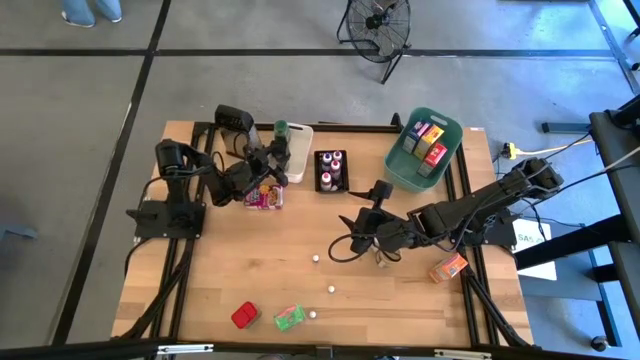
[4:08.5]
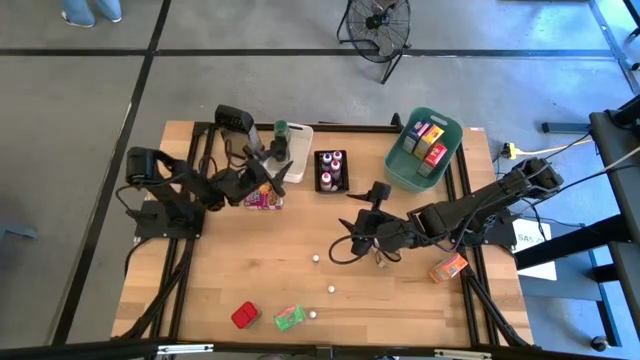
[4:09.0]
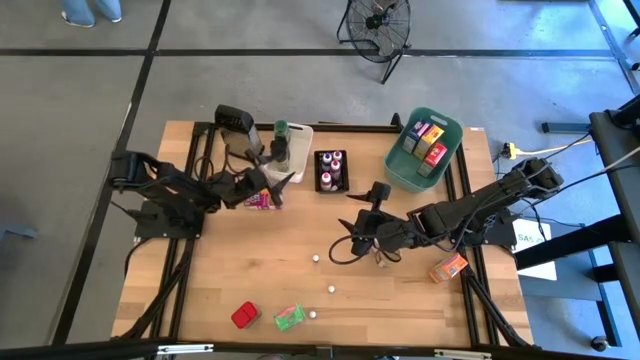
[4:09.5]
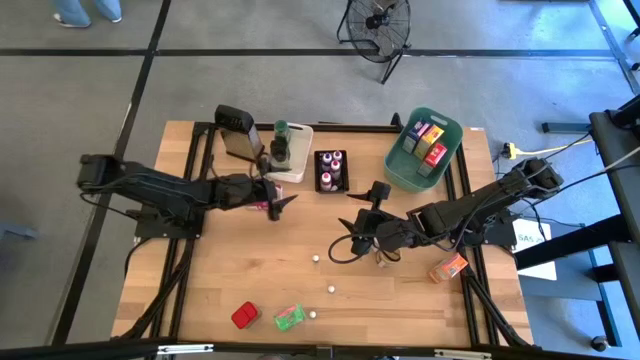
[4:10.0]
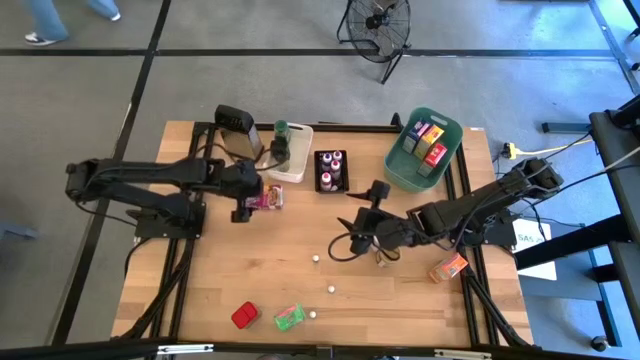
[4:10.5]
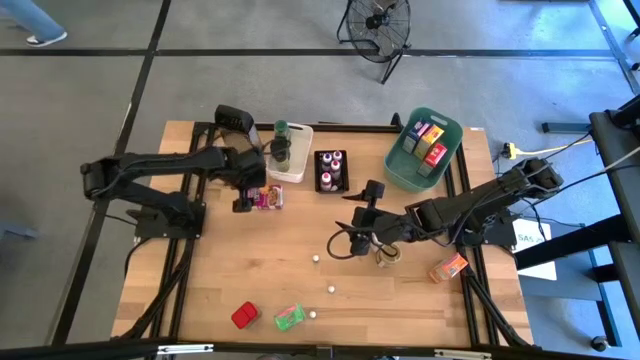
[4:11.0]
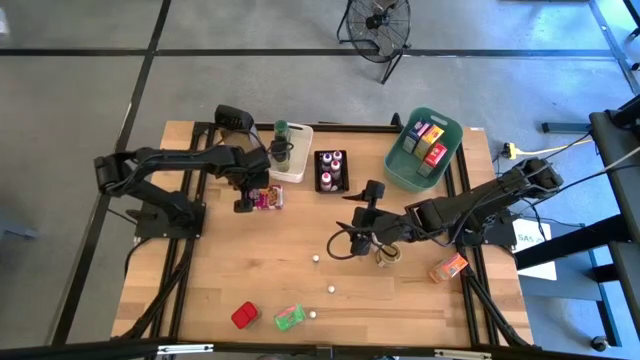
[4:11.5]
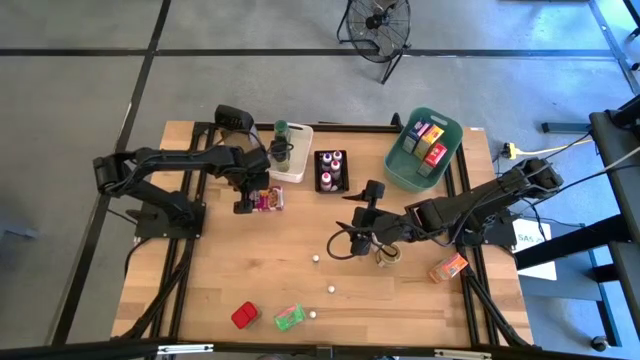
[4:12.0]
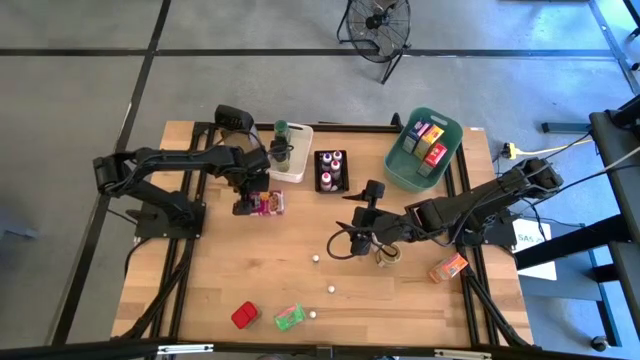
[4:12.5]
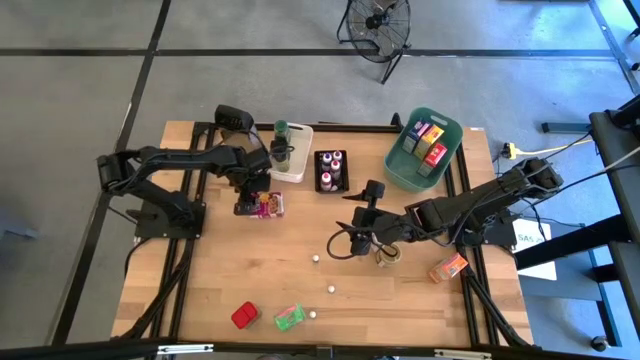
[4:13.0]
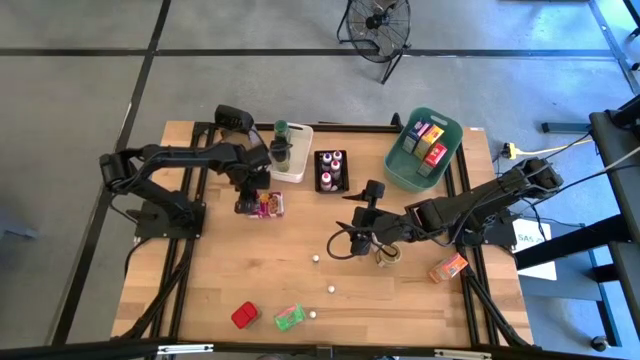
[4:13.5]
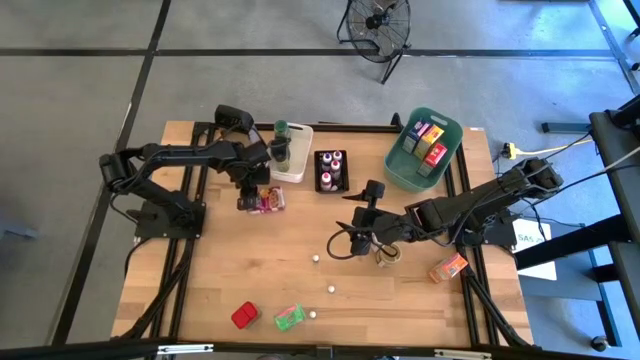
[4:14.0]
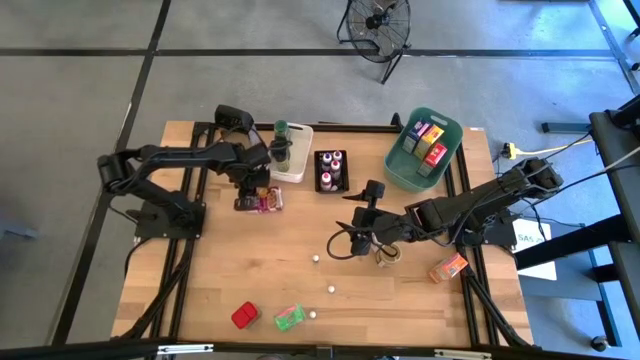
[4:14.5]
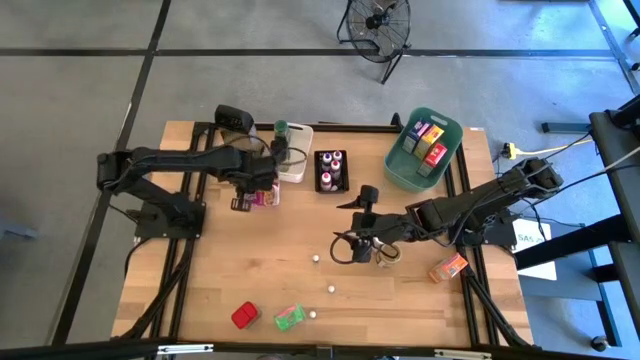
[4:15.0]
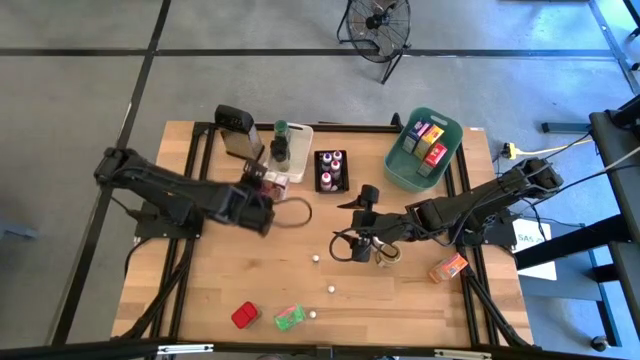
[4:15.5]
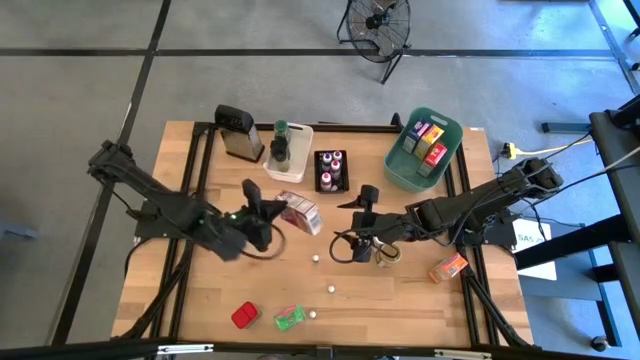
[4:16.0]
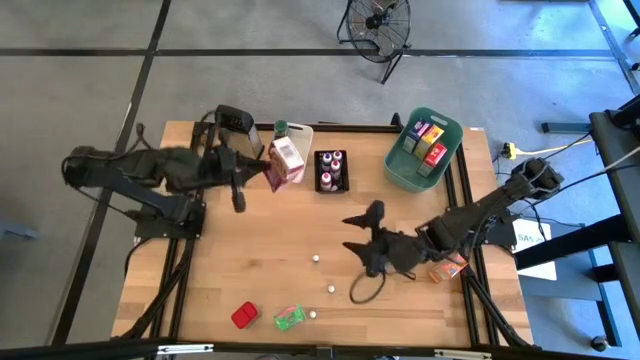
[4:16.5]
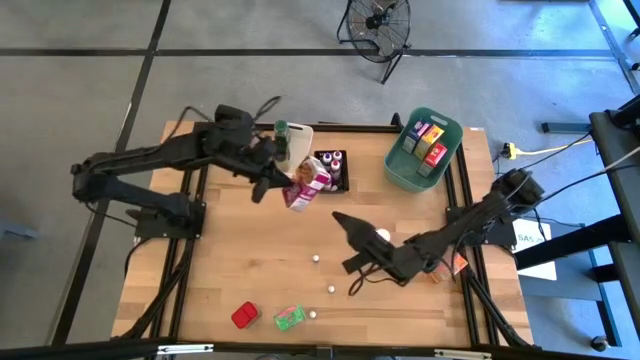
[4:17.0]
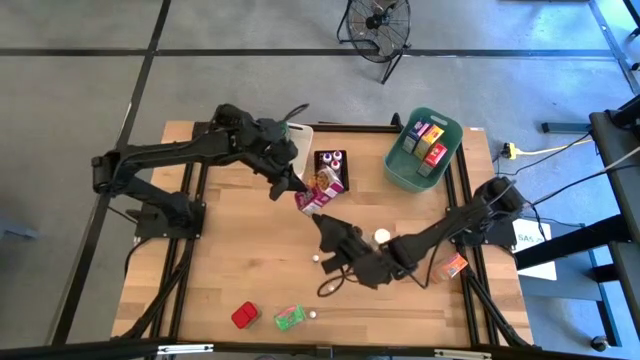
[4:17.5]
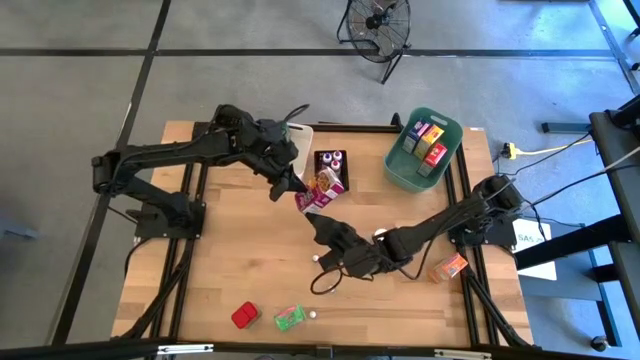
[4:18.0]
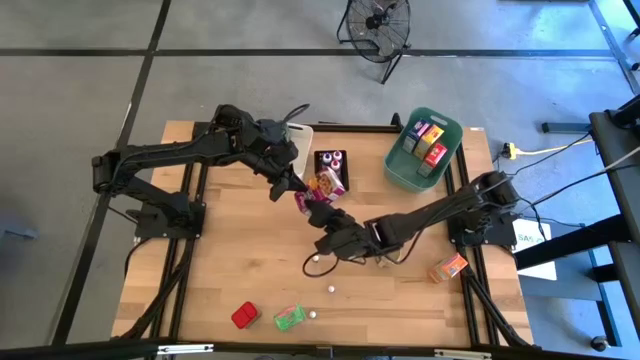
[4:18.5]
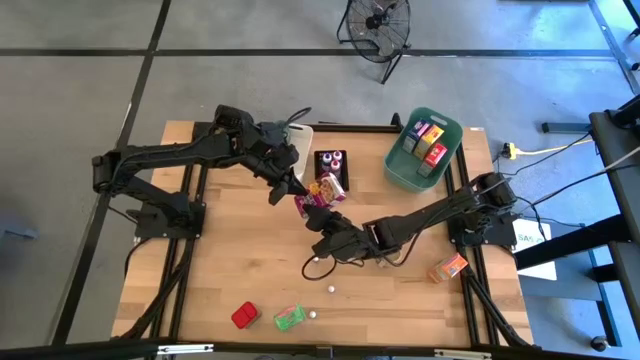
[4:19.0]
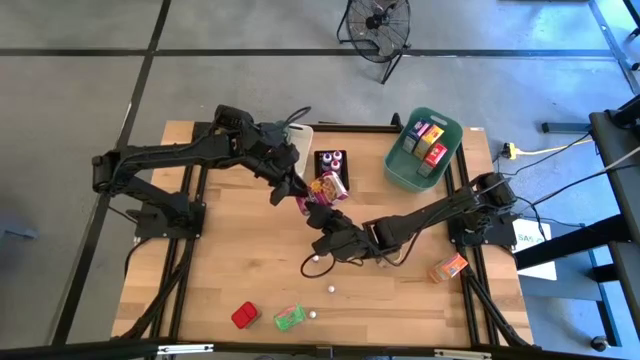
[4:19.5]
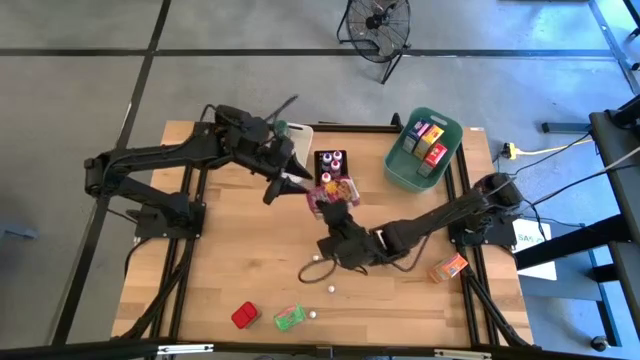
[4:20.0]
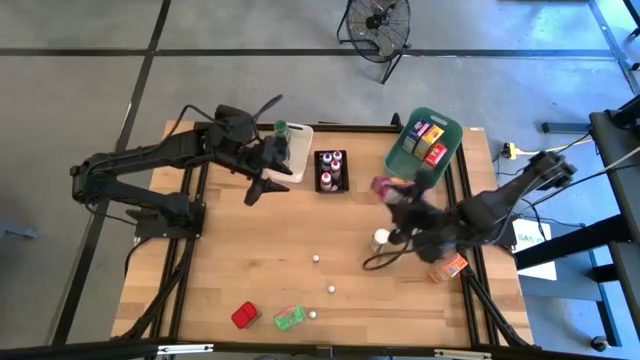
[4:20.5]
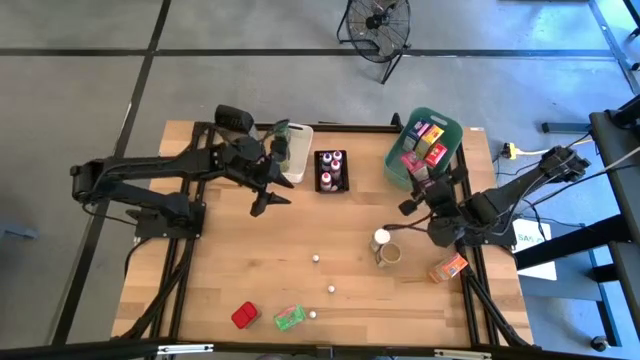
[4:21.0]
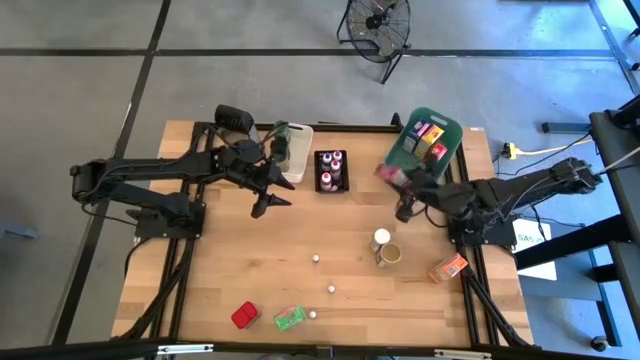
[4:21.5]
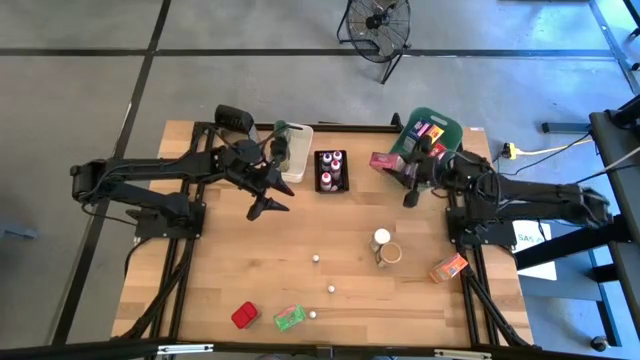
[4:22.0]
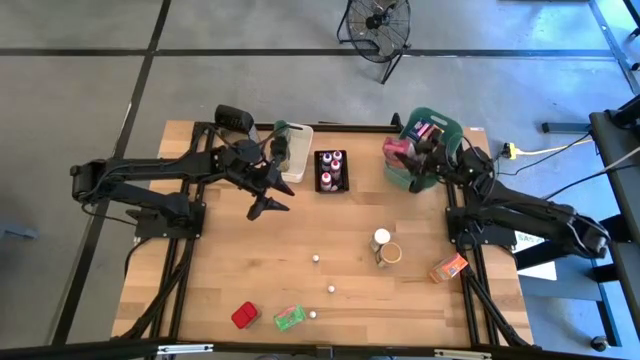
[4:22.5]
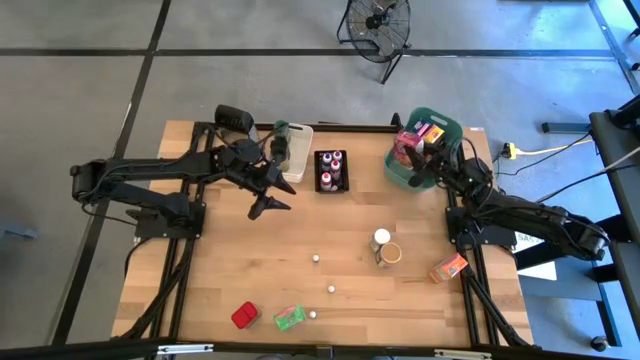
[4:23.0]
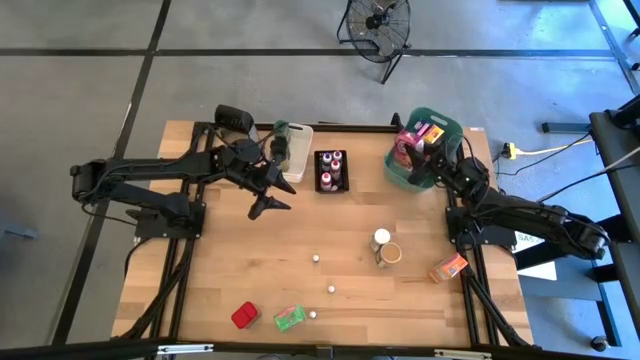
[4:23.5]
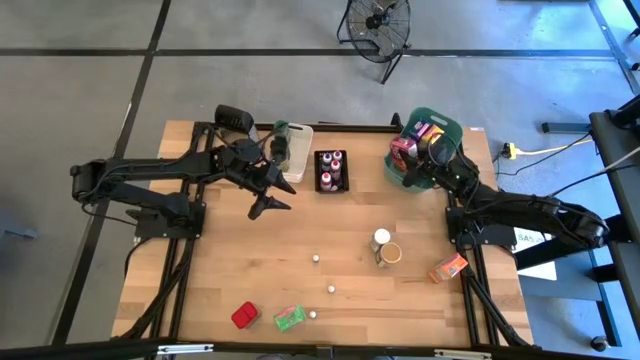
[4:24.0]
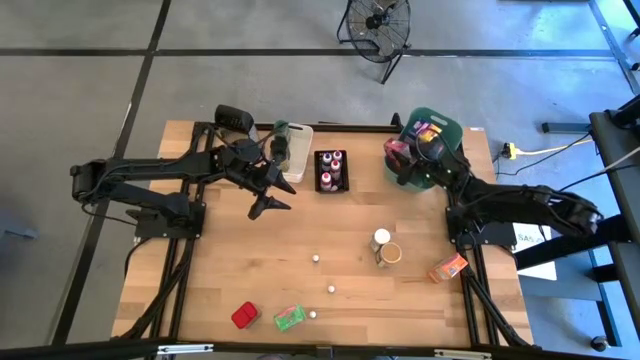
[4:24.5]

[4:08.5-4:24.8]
Task: Pick & Place Kitchen Items
Put the purple cereal box into the green bin

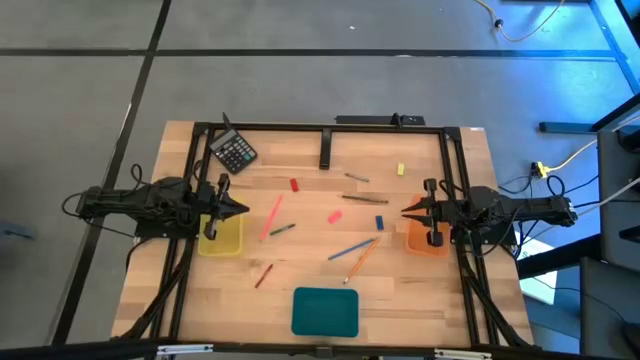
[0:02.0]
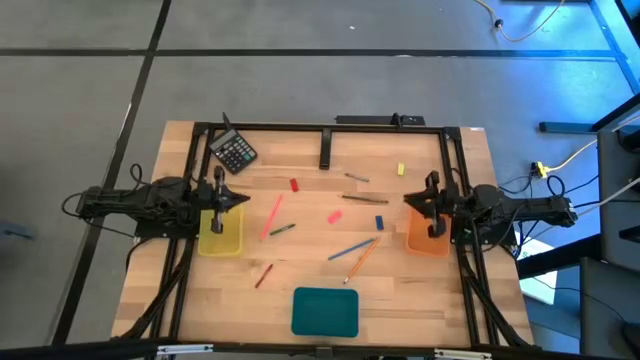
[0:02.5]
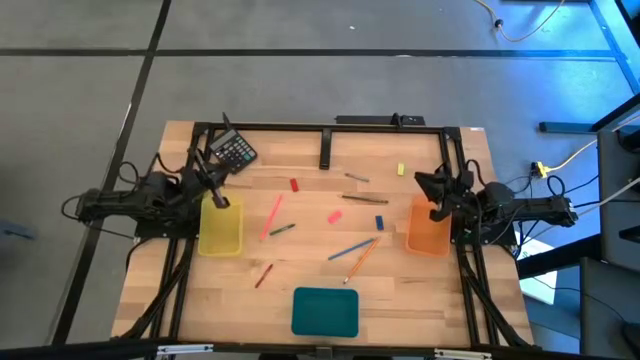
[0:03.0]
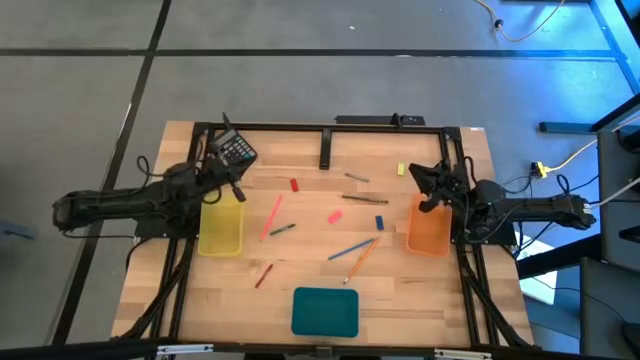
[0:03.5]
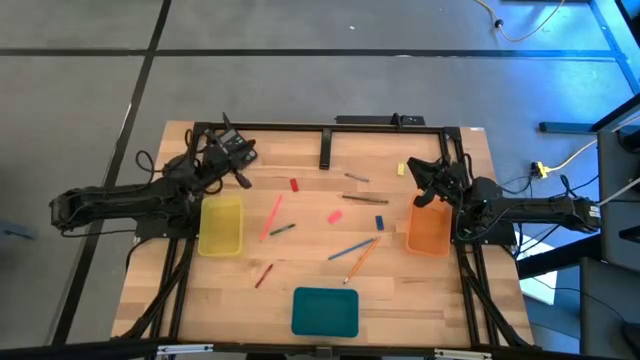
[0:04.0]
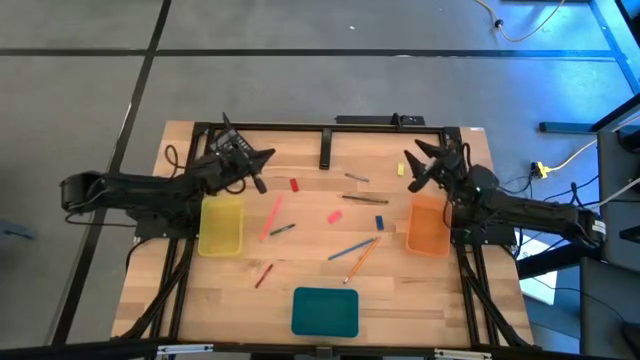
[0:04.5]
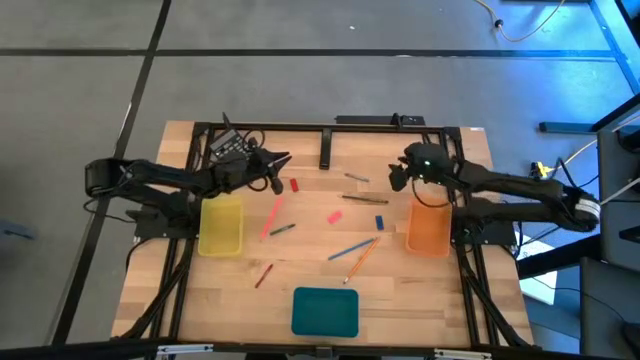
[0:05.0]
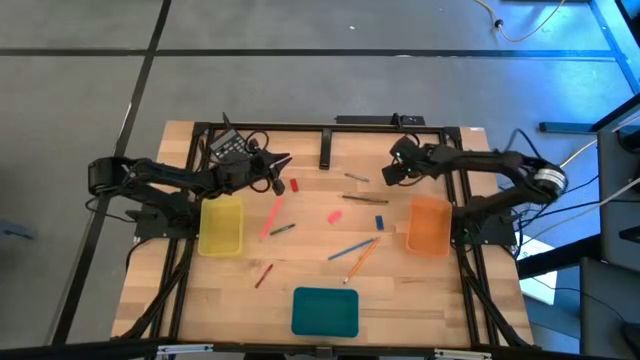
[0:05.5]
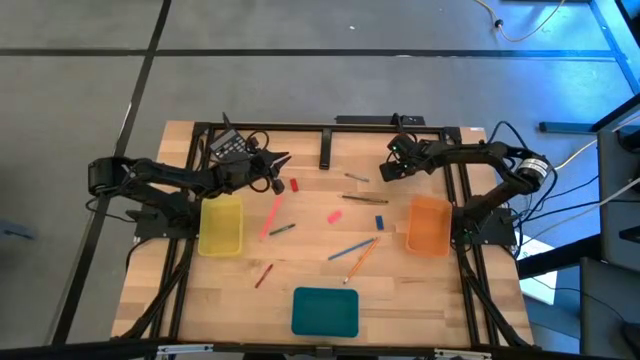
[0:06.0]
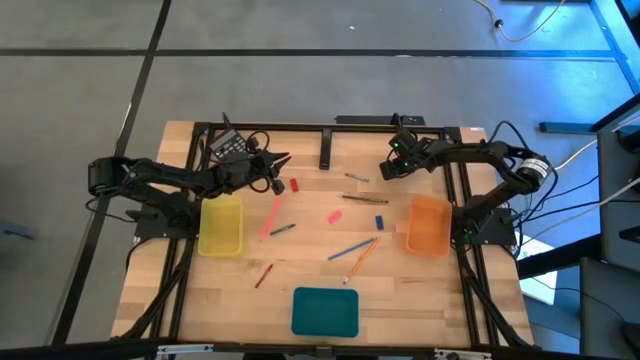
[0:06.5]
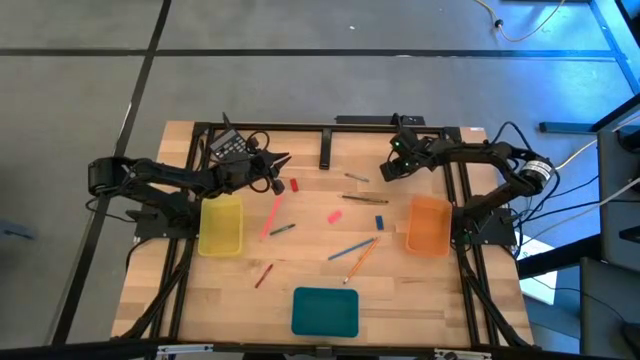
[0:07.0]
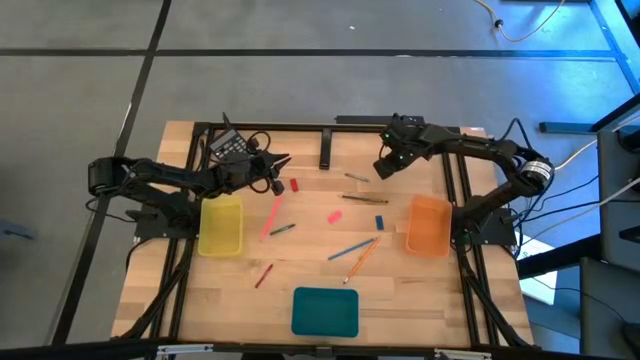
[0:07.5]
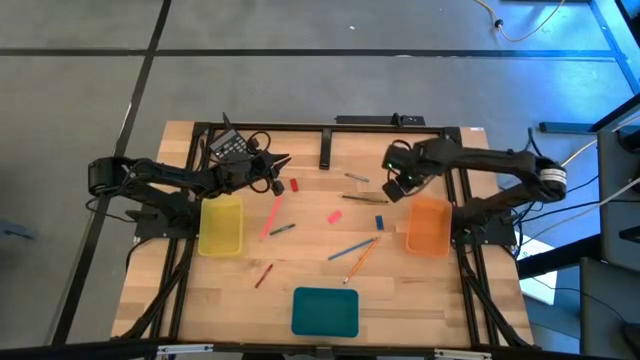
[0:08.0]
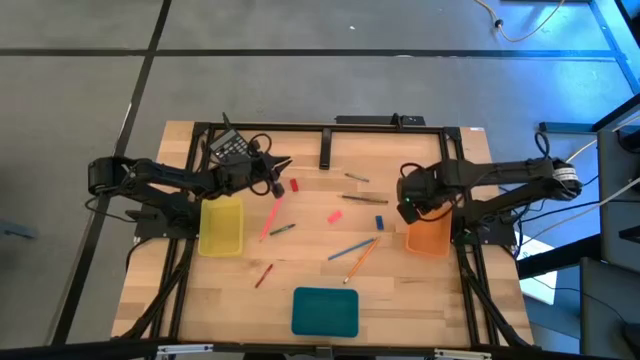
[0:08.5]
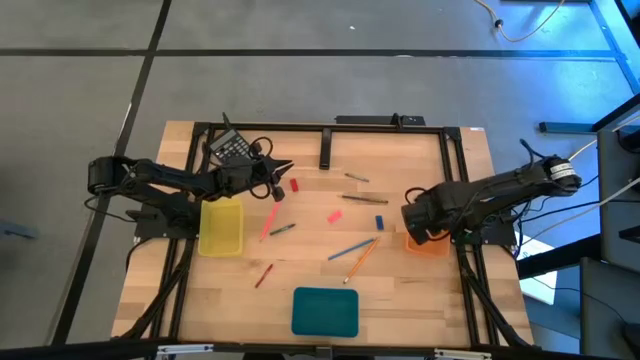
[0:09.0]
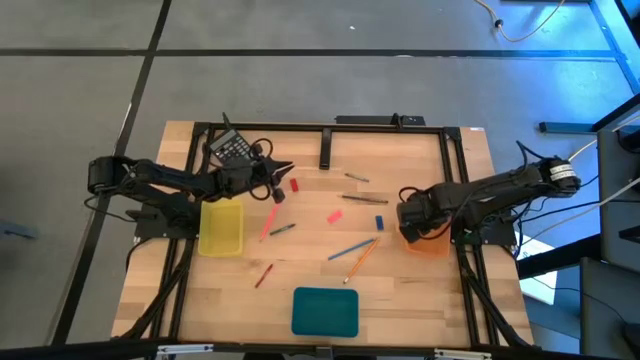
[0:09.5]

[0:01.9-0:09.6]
Task: Sort crayons/erasers/pens/pencils in bins
Put the green eraser into the orange bin
